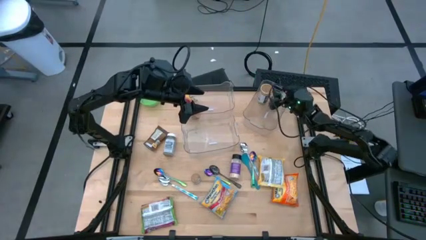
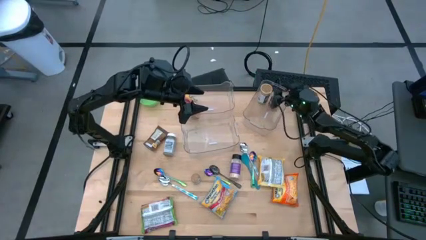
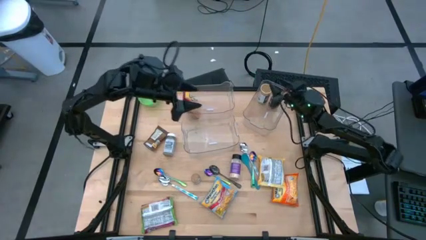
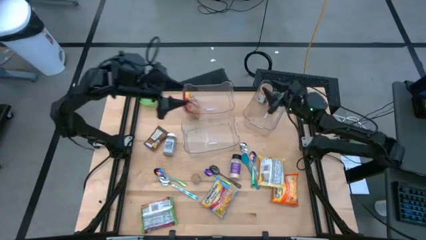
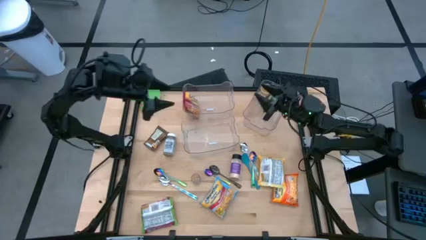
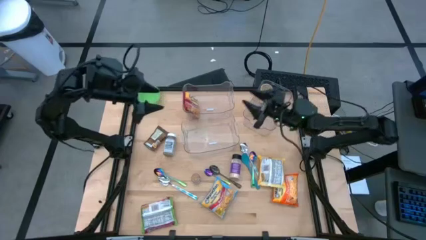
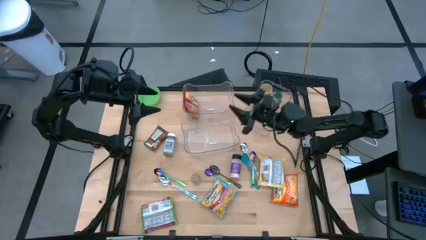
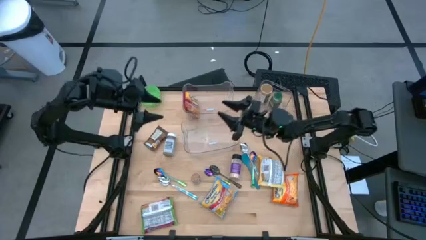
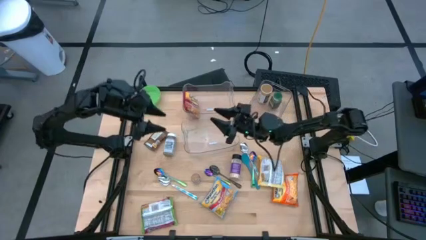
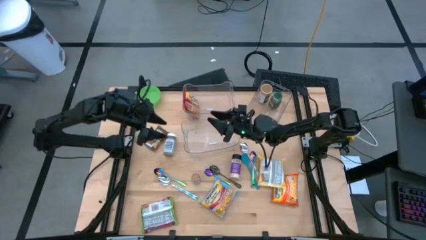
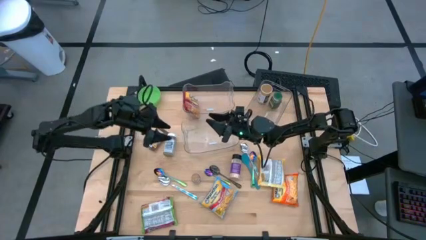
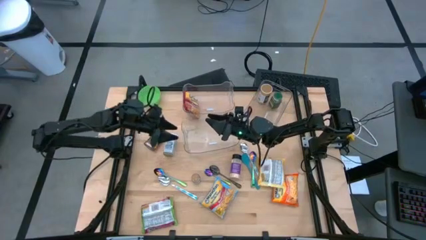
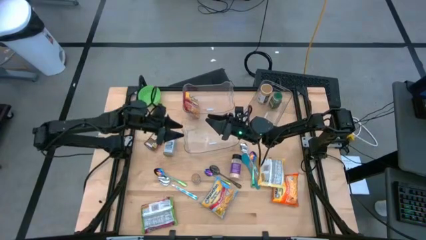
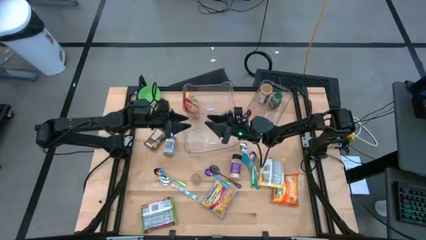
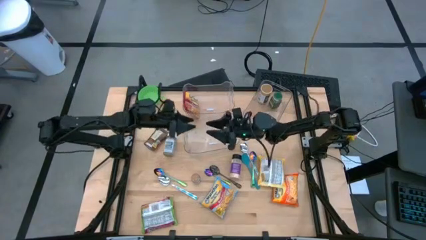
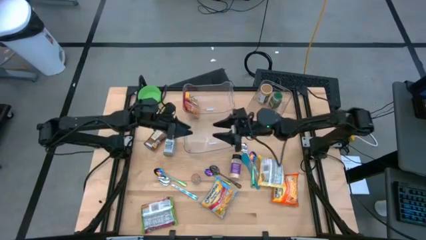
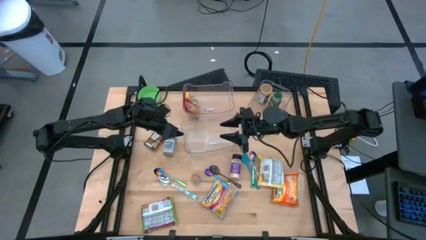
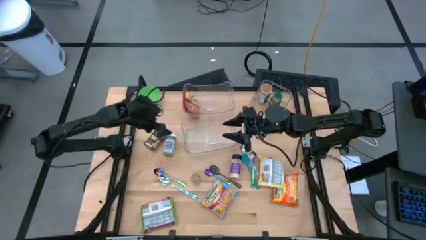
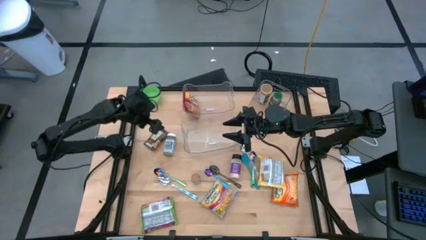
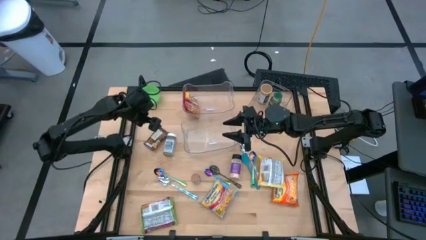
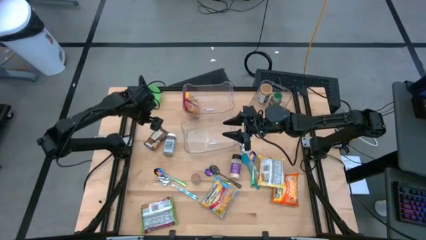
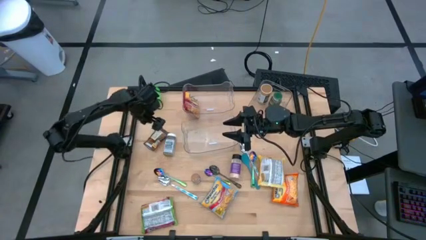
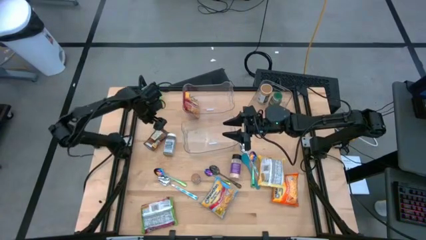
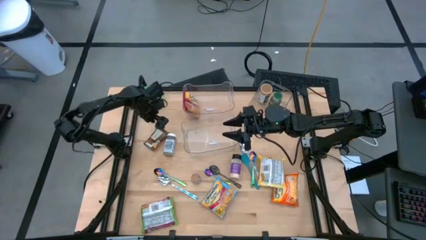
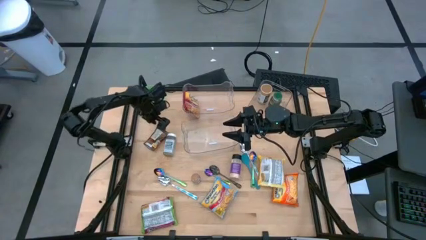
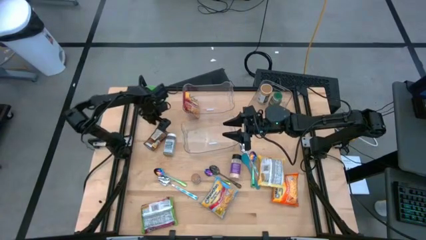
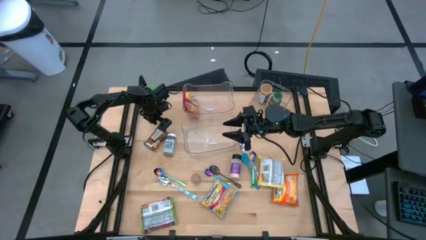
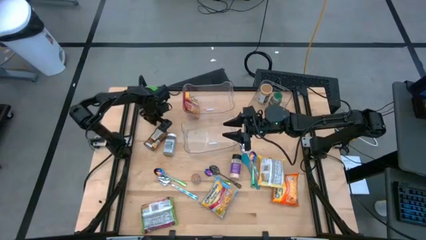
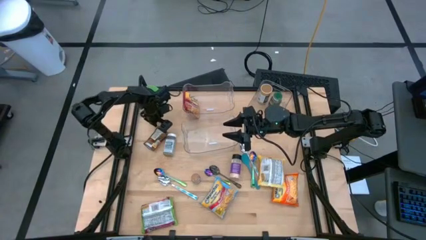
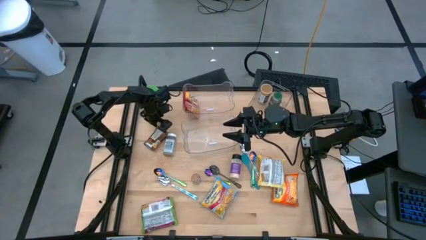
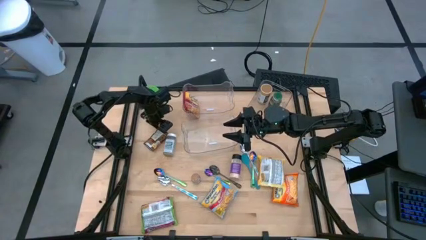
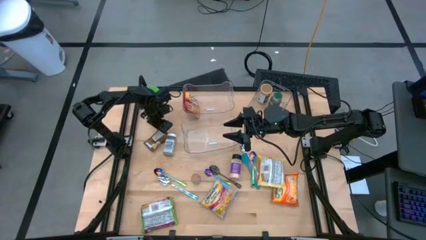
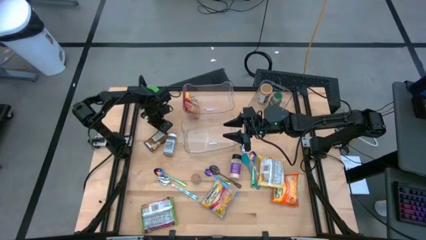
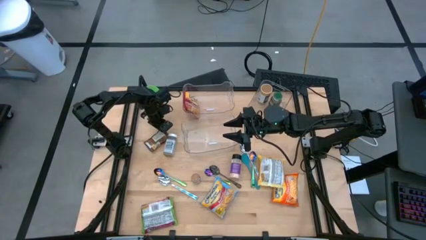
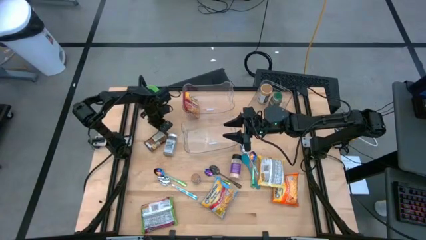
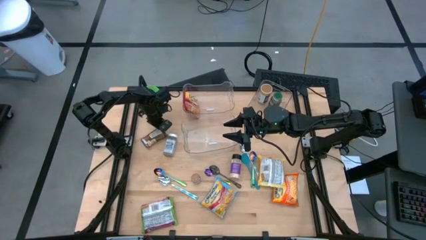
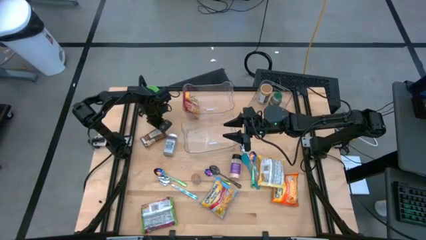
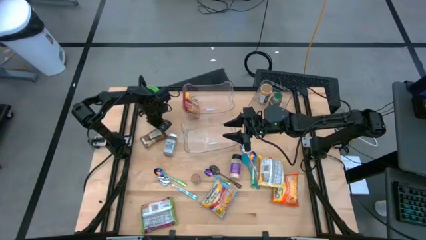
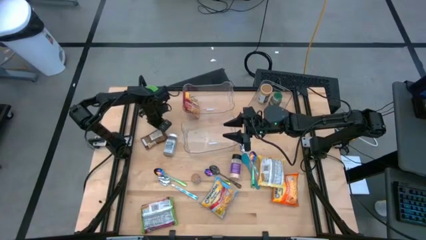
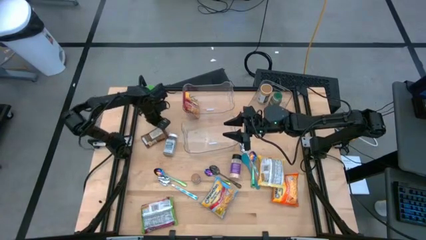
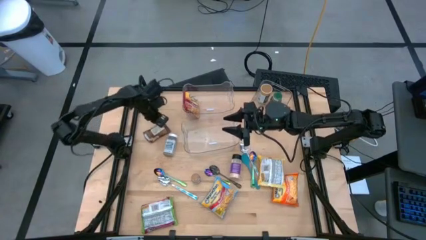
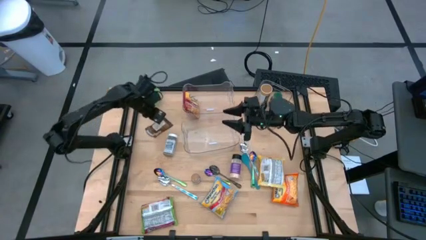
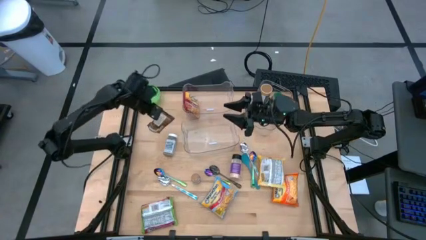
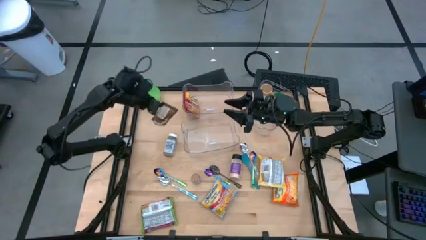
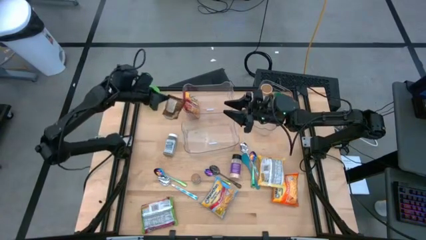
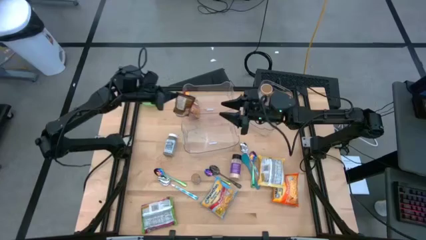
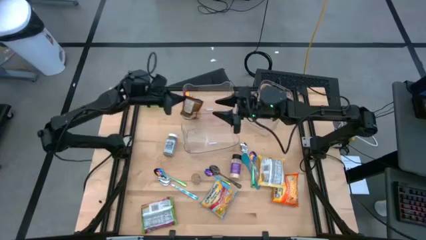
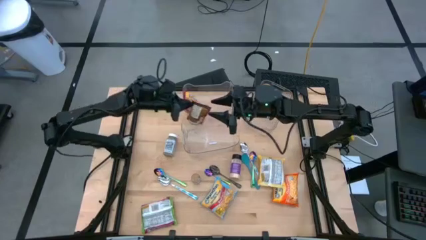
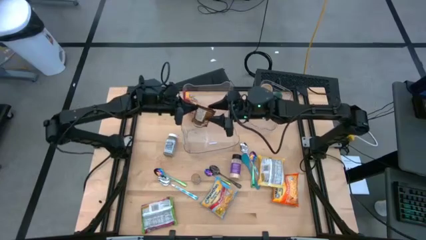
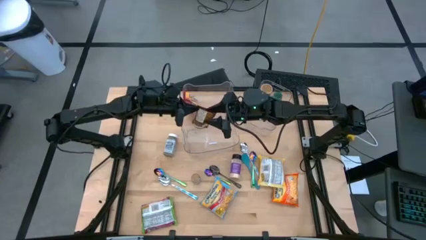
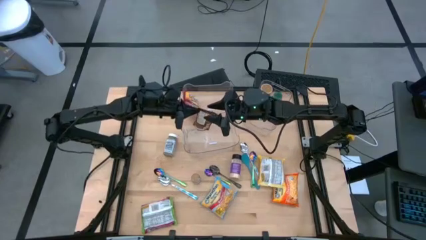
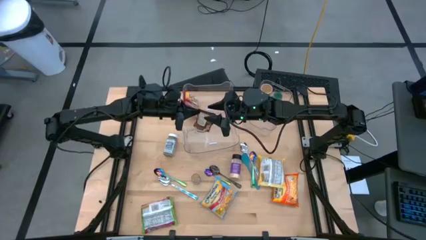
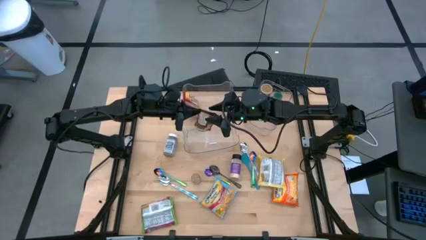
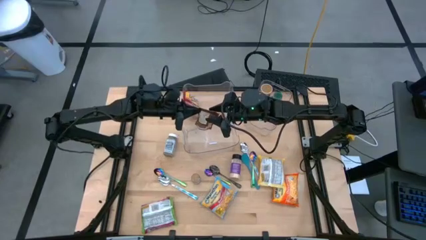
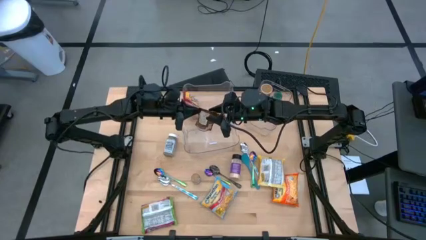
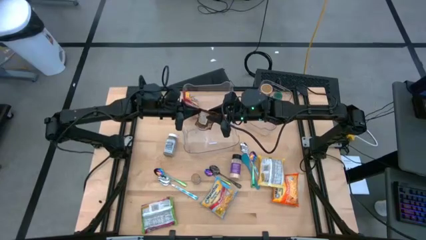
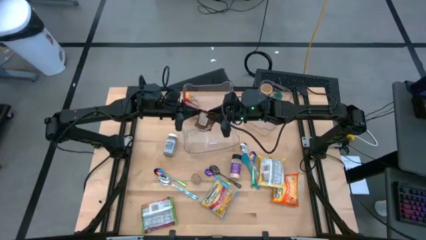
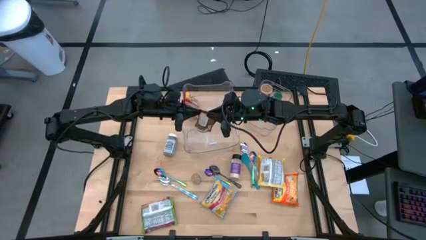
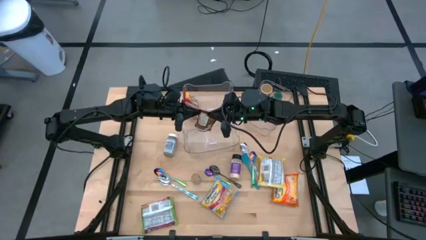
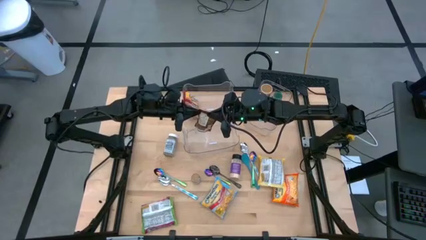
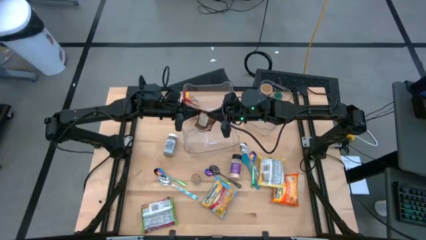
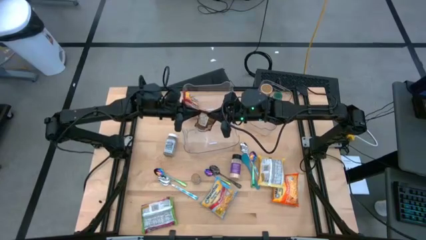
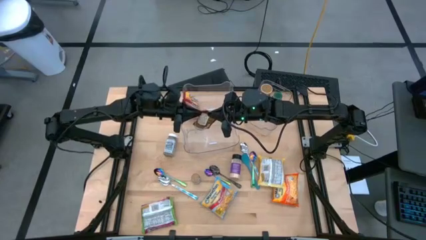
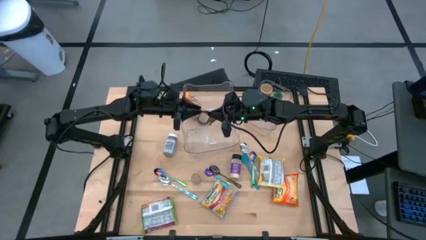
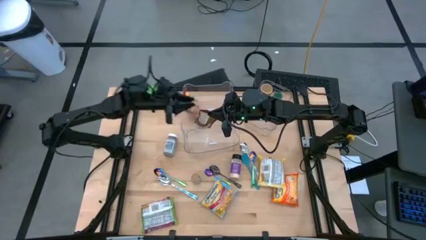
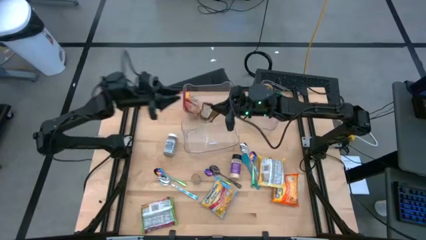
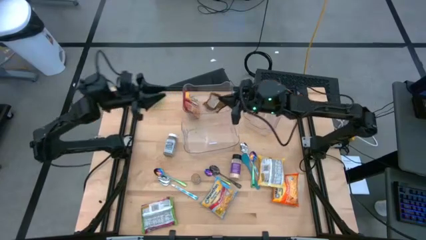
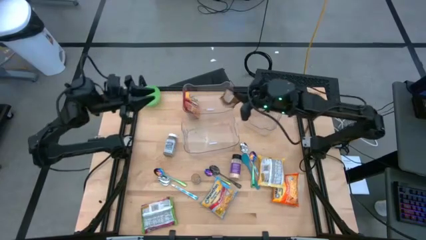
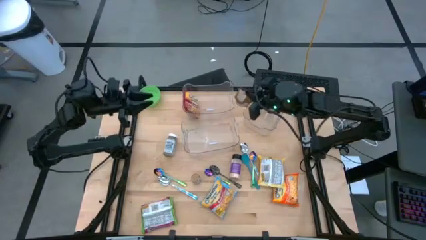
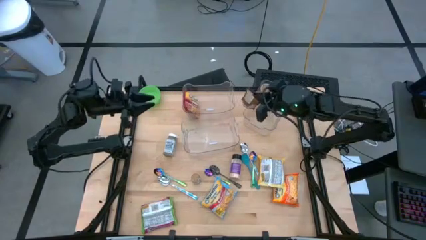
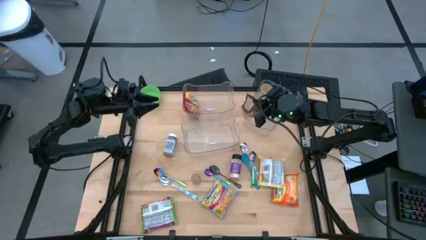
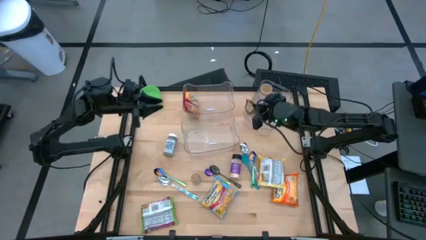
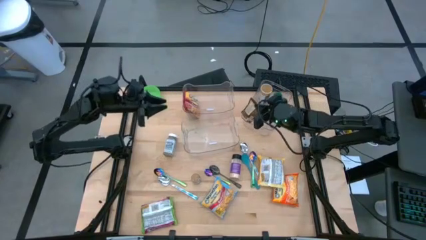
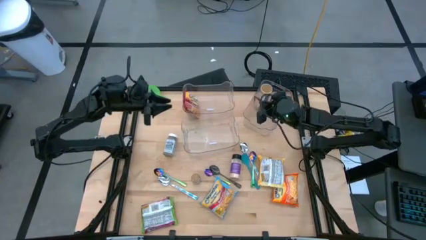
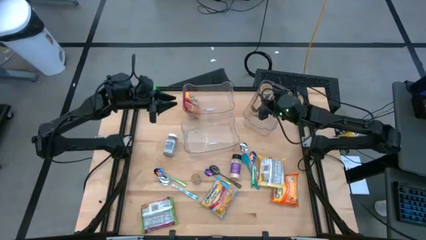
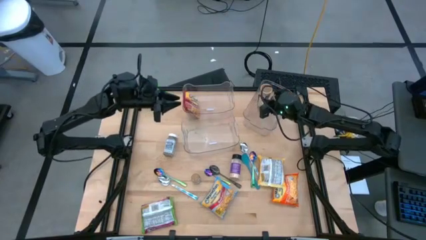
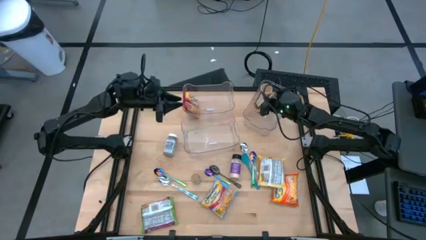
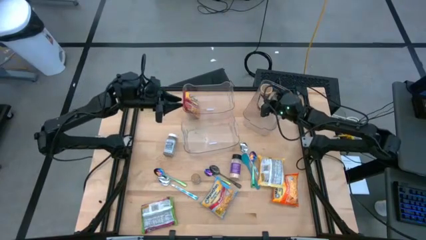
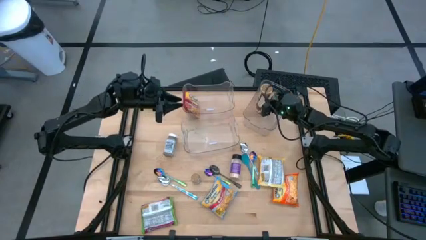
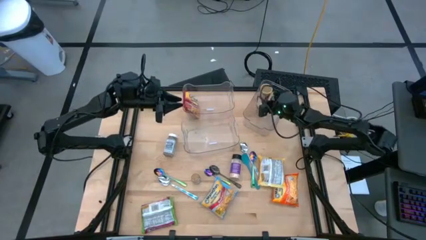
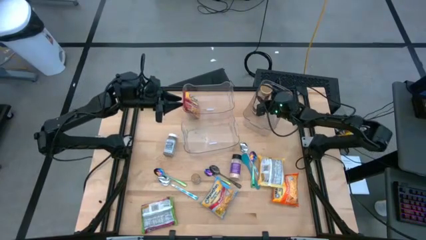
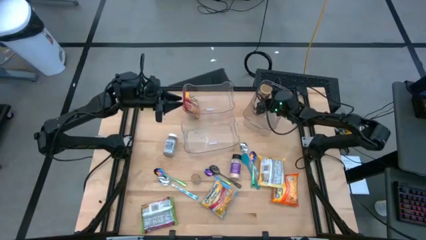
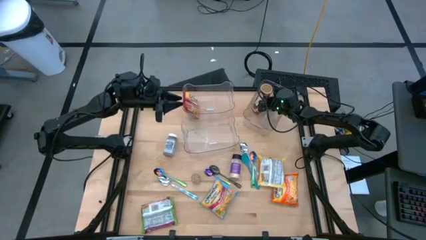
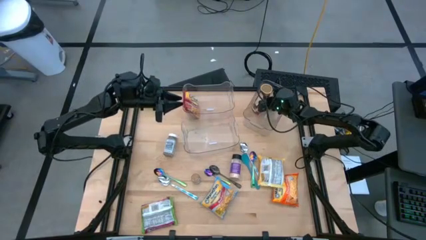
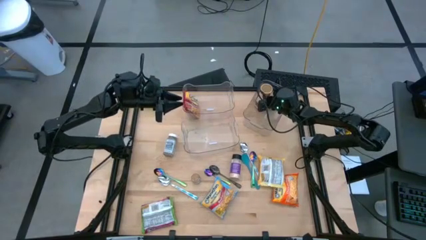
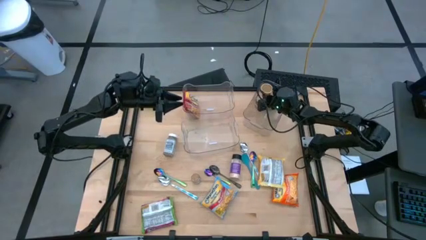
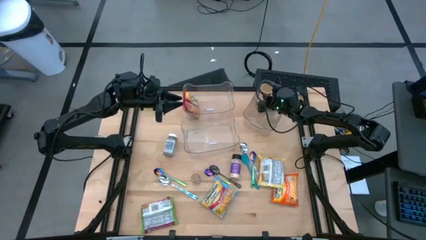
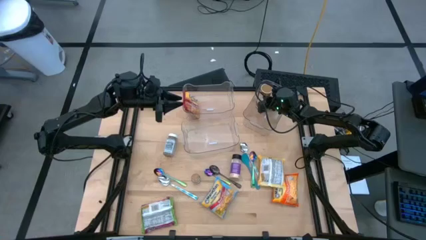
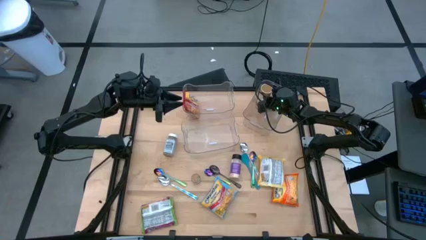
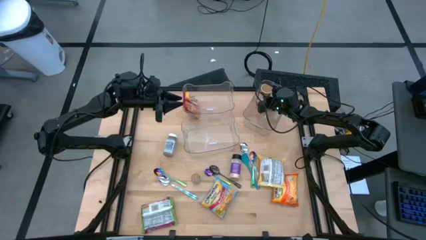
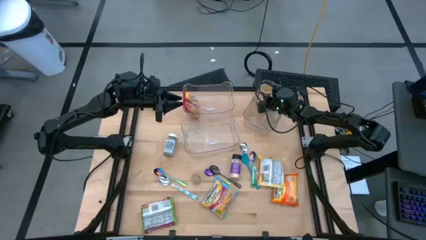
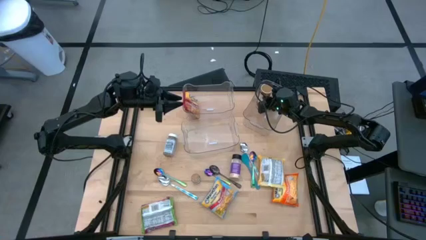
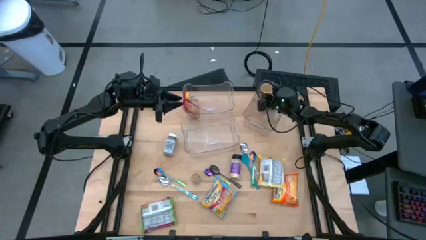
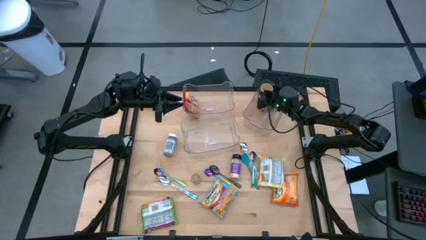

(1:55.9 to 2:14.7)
Task: Pick & Place Food Item
Put the orange seasoning pack into the top right transparent bin
